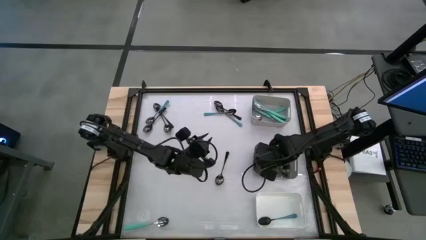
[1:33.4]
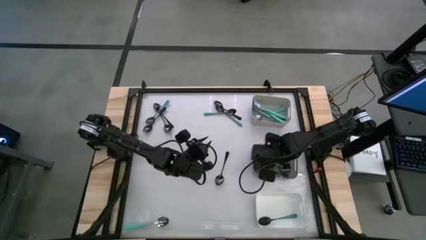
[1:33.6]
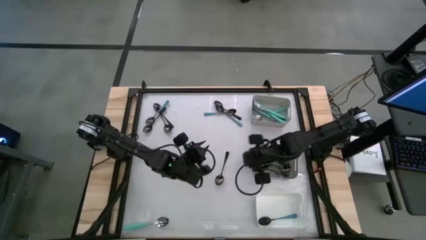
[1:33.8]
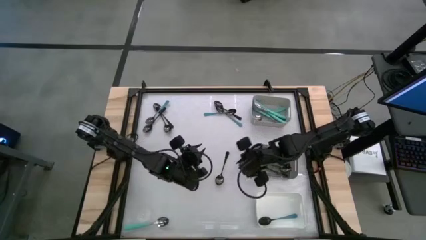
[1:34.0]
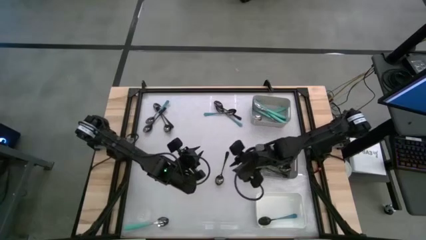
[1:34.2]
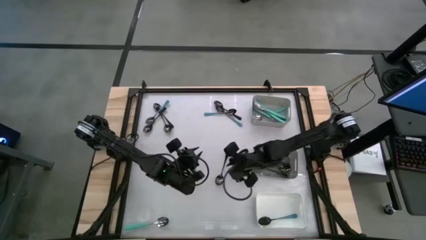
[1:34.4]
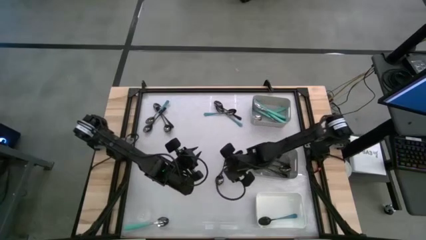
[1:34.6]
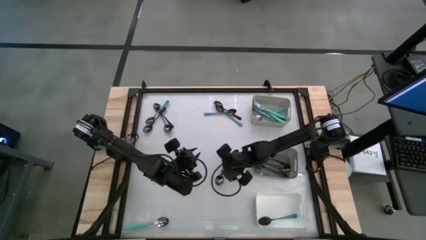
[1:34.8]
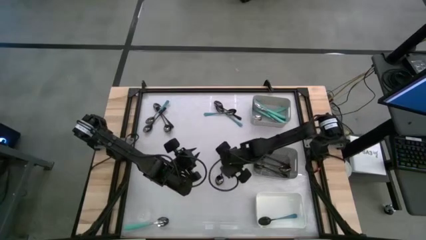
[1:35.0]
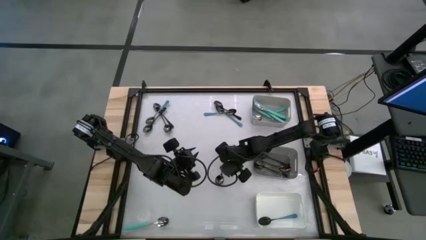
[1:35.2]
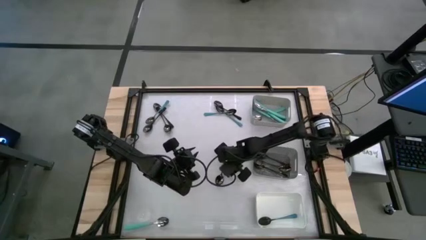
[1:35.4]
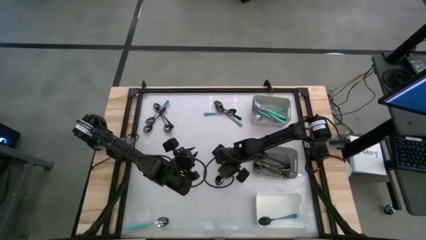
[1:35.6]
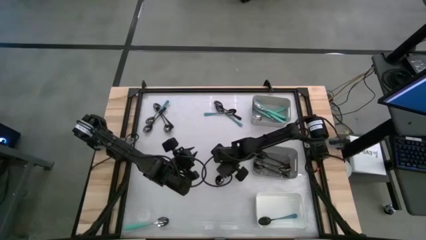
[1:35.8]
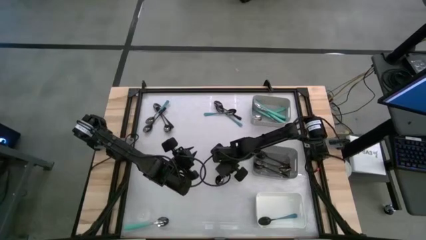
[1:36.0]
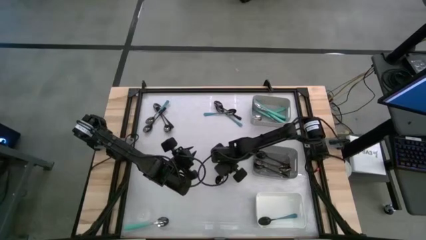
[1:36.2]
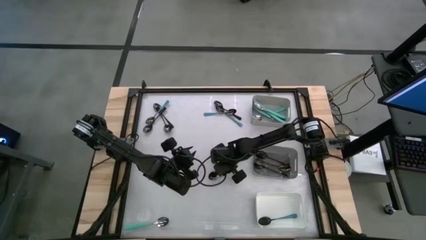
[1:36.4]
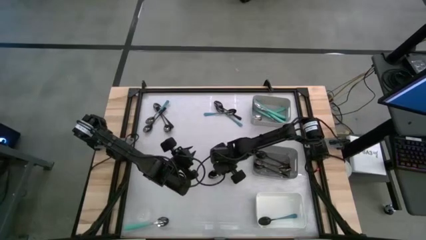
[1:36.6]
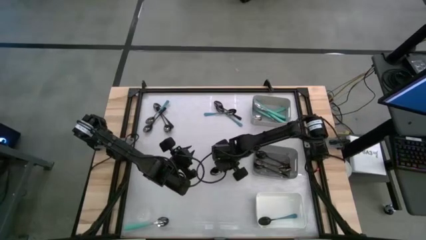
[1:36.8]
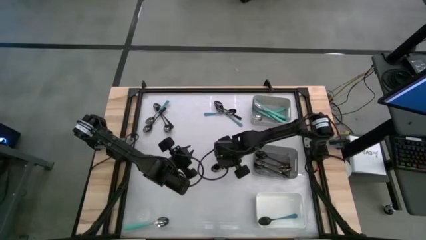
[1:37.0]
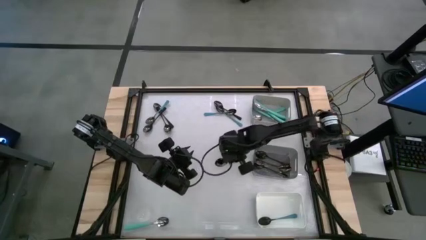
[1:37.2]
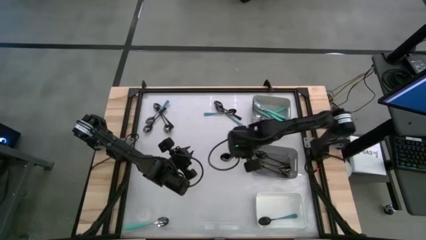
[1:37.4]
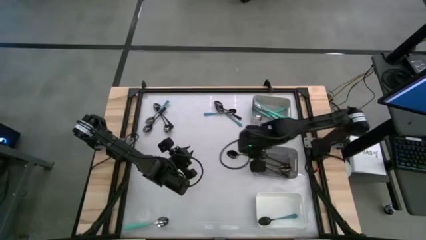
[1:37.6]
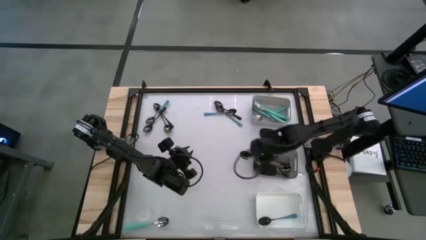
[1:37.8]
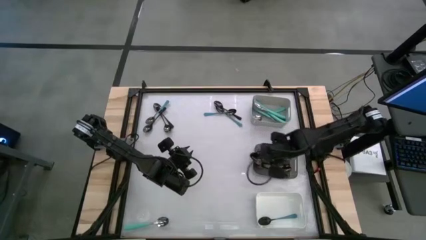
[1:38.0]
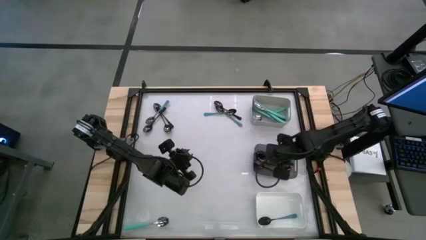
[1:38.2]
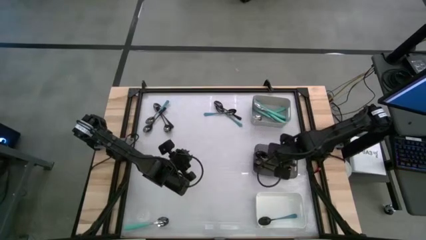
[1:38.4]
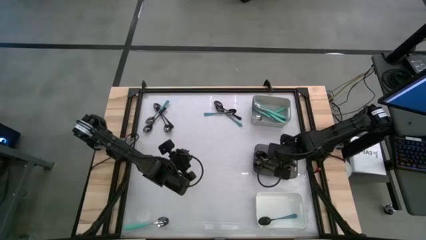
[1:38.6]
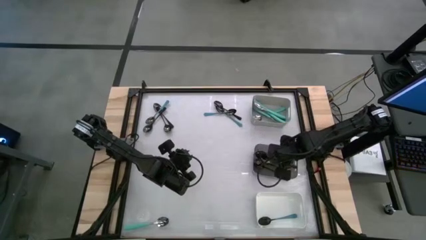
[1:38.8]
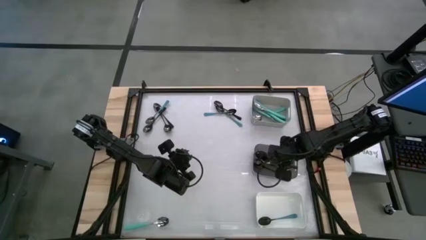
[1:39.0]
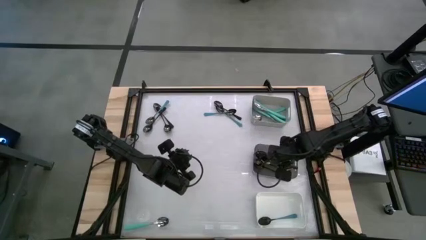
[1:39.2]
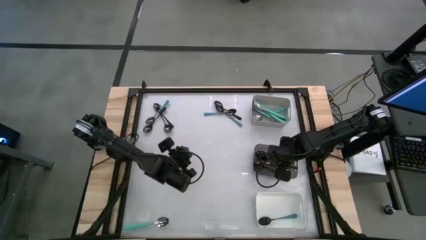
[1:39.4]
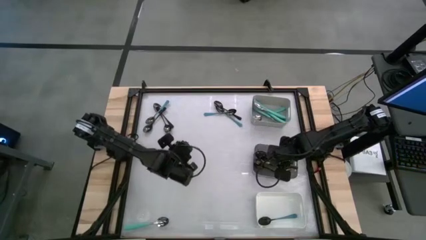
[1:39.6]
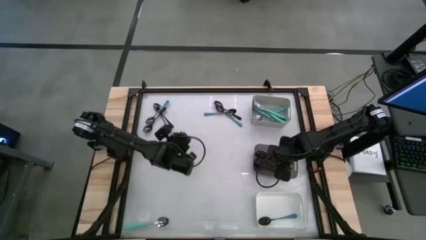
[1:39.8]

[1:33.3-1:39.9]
Task: Sort silverware by color (type)
Put the black spoon into the black bin

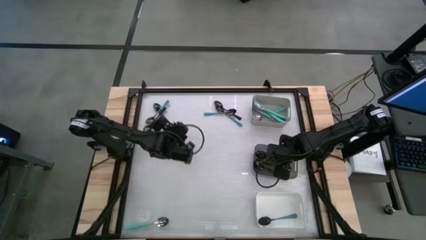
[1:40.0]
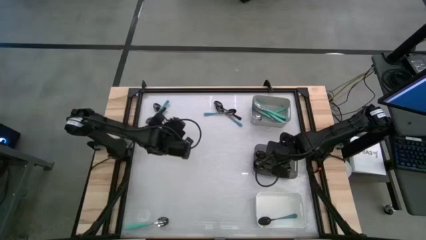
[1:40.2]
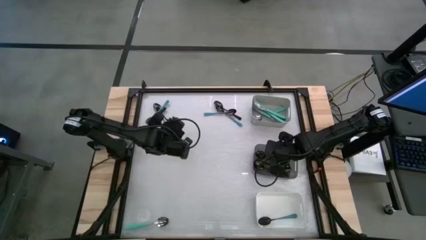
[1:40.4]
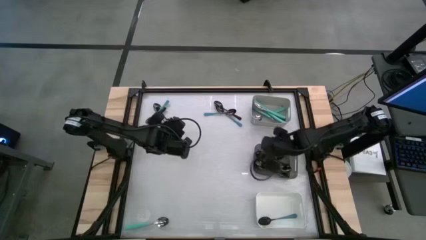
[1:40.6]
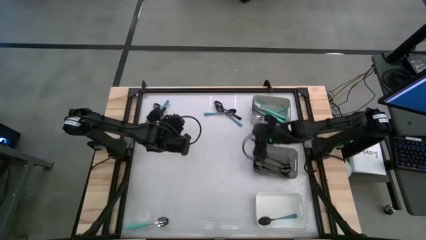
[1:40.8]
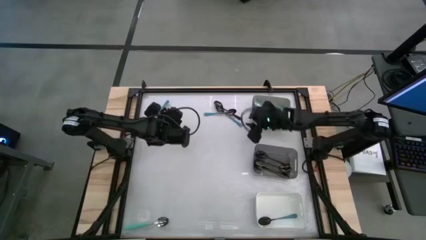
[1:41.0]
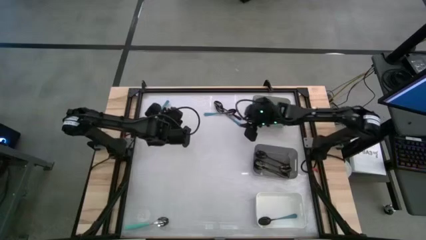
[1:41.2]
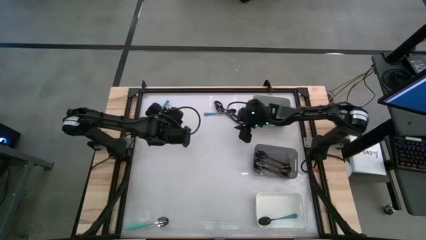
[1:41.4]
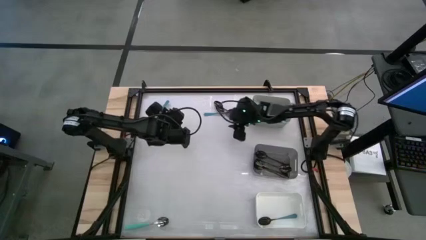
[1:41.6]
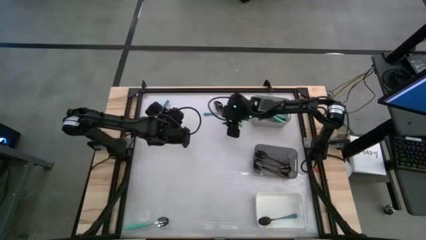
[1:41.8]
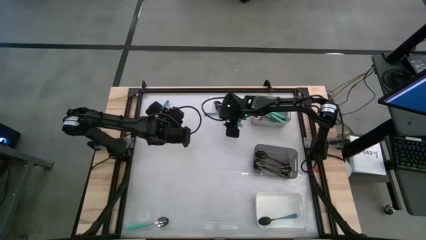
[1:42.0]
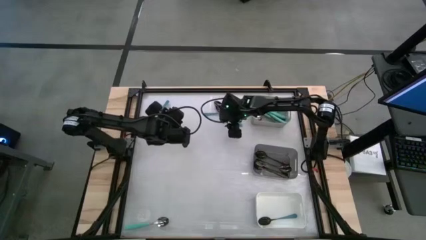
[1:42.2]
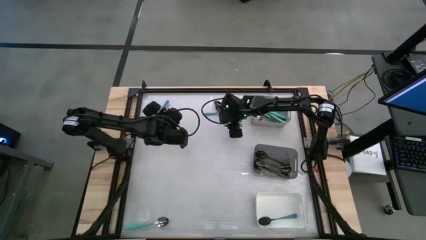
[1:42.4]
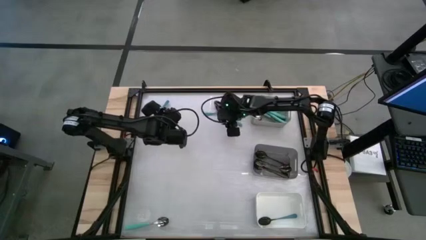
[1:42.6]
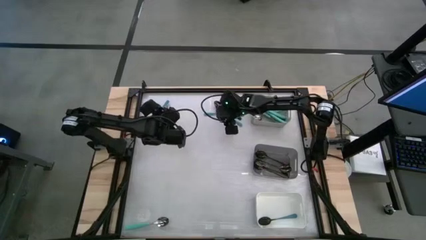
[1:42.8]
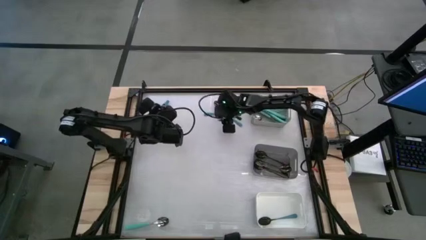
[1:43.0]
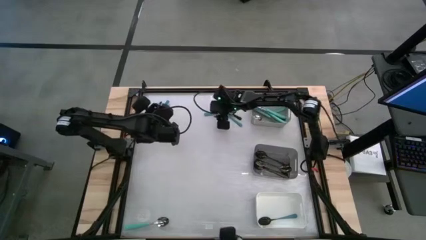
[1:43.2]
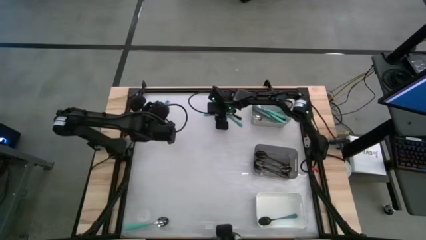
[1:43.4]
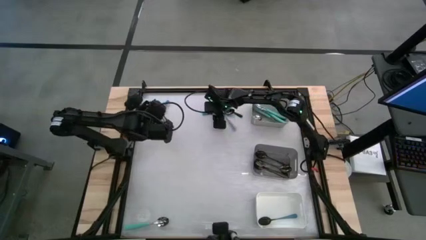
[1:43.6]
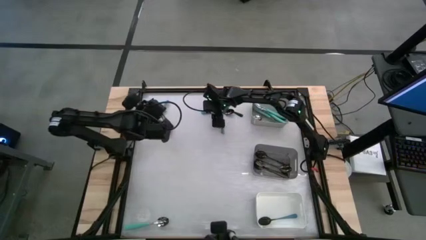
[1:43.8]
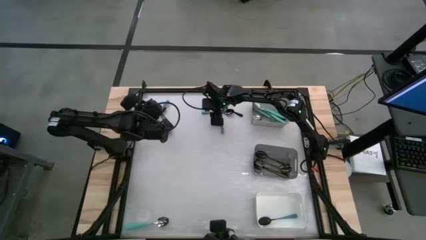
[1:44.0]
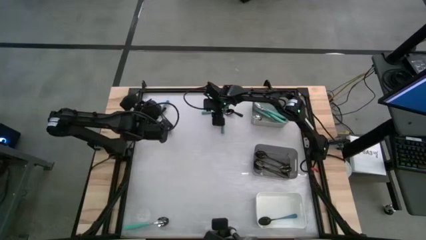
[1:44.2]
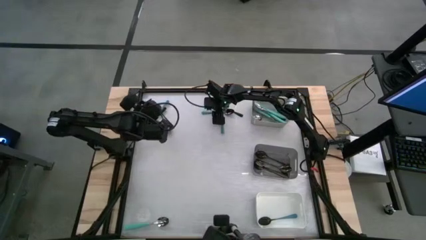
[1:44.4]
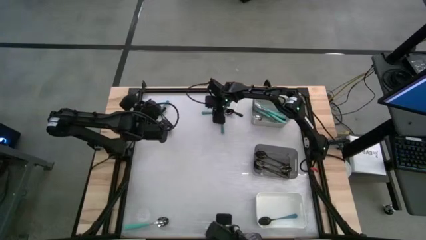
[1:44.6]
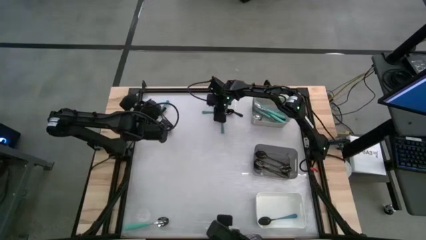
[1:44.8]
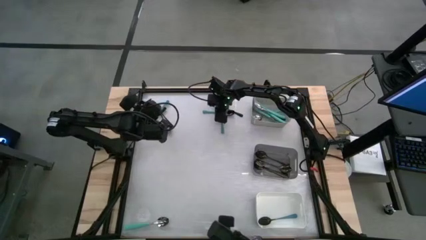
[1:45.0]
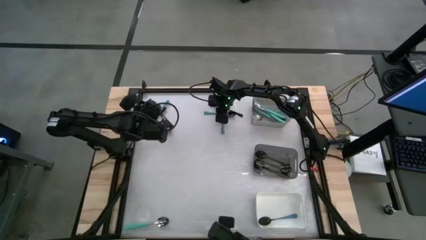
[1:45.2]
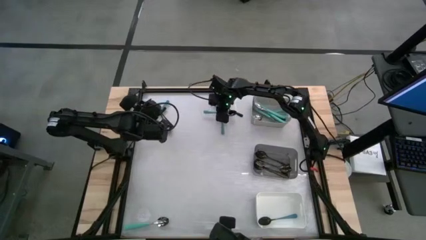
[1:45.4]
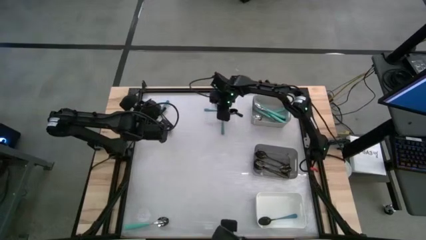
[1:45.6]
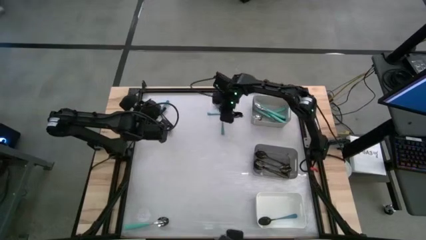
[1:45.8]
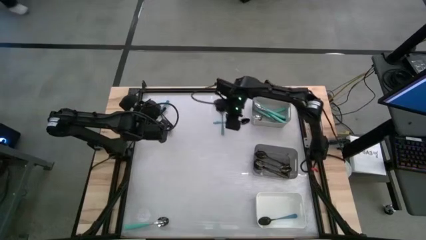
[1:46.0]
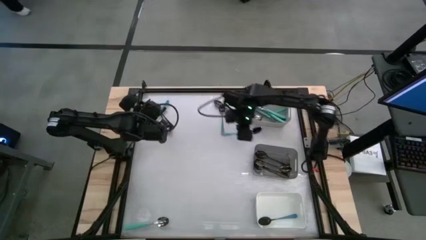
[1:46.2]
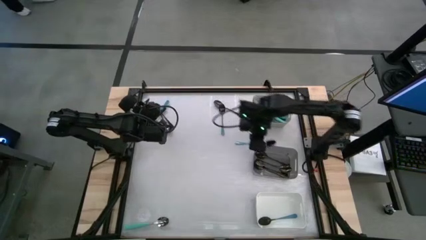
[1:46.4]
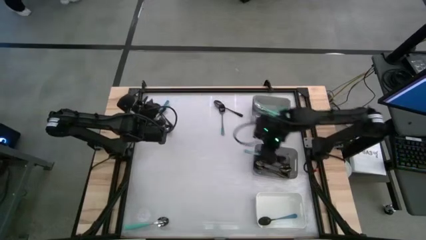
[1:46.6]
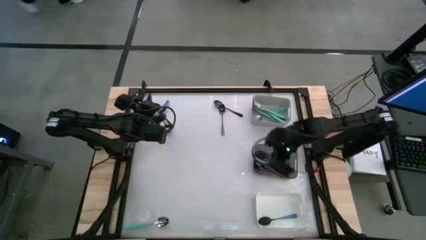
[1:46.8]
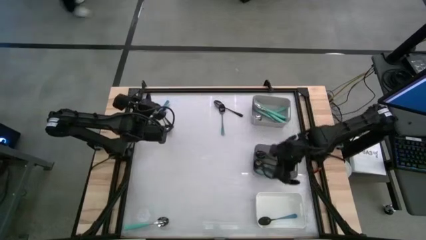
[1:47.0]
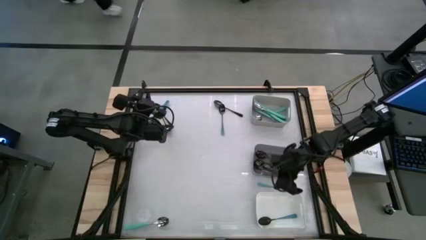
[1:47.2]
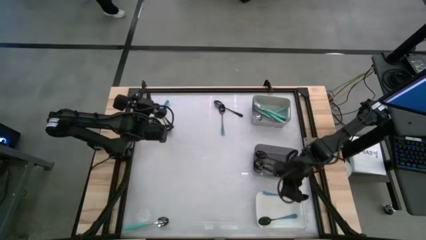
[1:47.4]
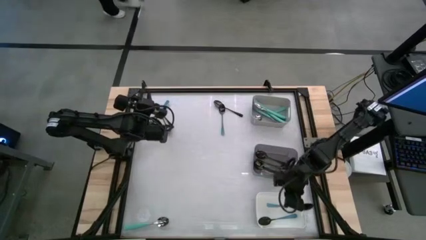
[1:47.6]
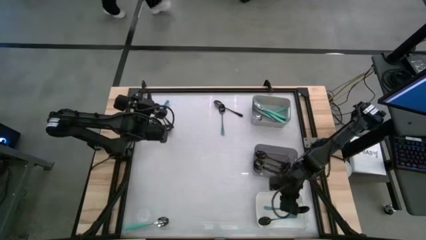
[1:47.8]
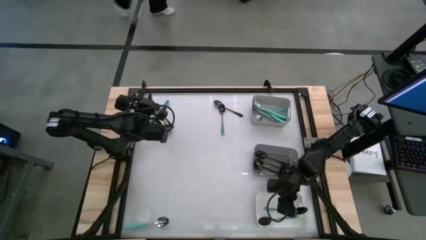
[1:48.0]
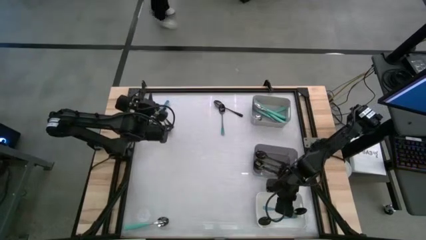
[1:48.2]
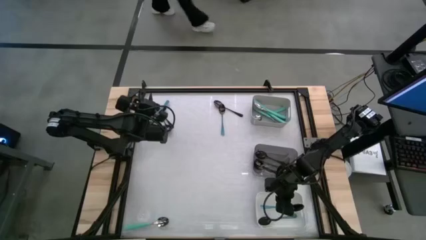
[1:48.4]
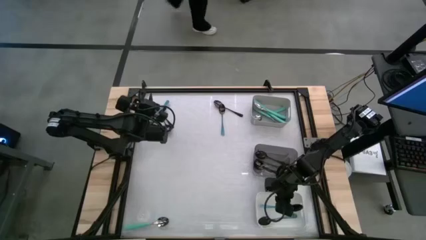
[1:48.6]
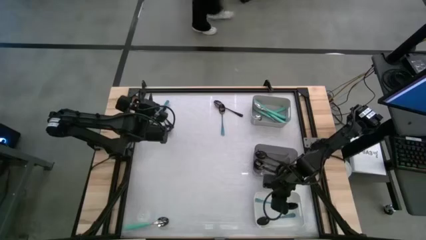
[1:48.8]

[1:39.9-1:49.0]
Put the blue spoon into the white bin

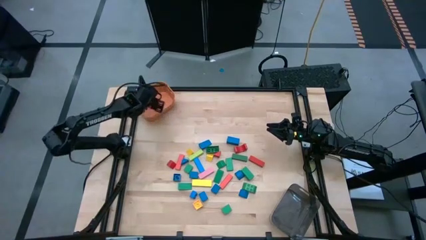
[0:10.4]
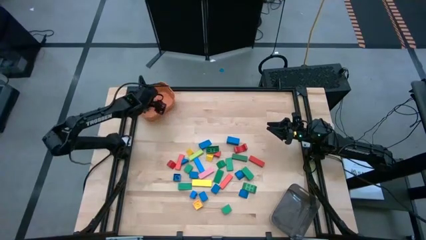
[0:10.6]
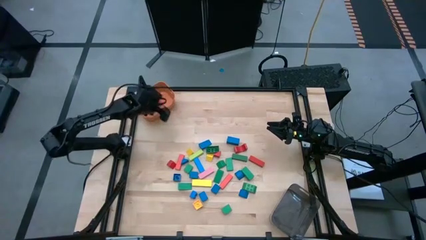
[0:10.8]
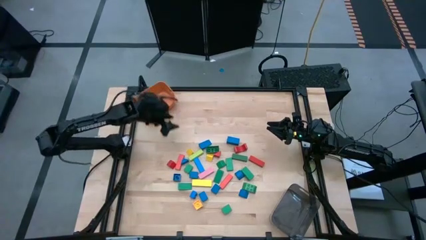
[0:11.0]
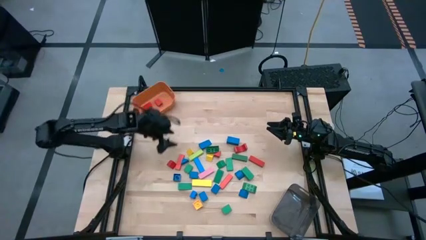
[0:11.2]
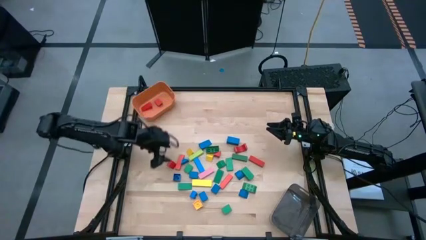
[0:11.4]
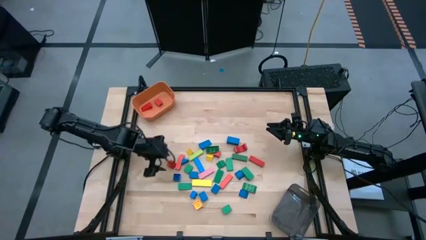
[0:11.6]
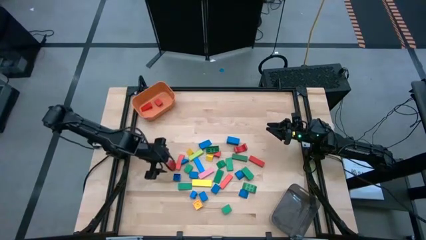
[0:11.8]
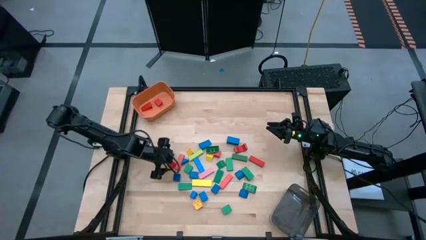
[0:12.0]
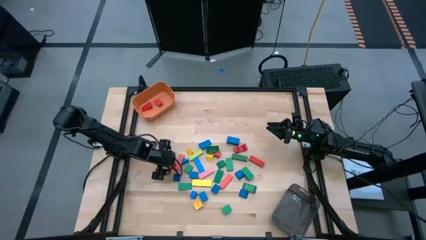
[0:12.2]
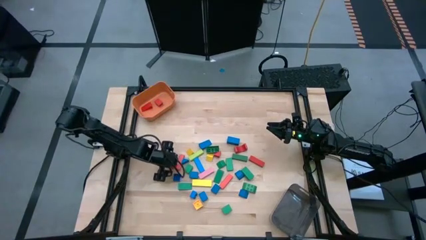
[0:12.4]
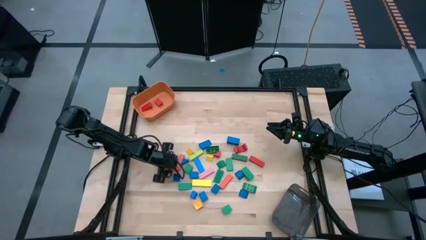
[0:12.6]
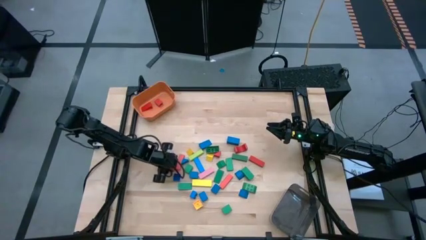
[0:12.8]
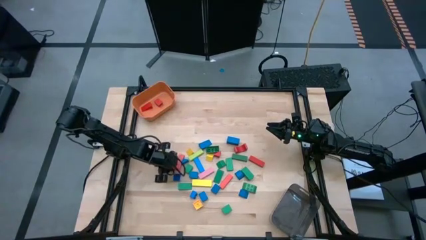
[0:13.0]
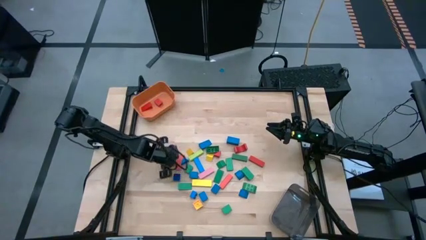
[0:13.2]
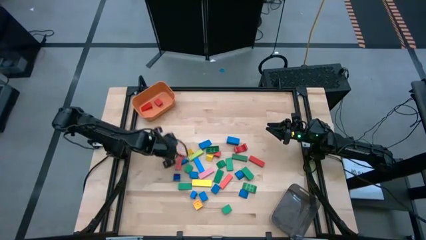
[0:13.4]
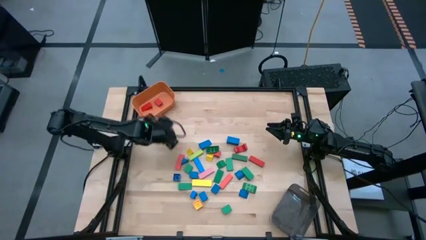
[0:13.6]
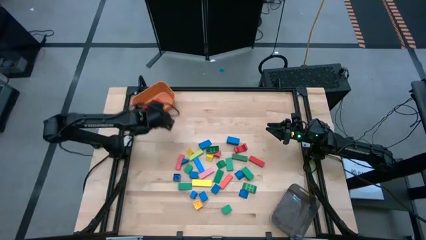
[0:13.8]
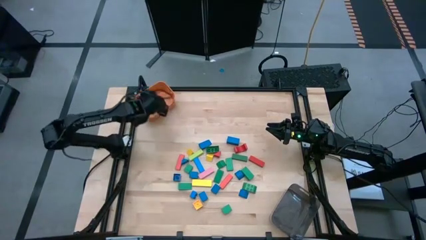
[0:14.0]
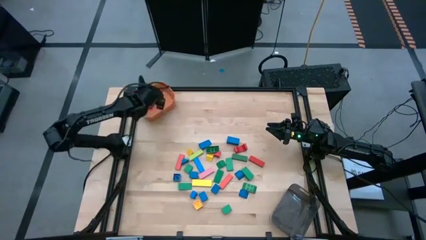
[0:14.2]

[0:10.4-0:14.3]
Task: Sort blocks by size
Put the small red block into the orange bin
